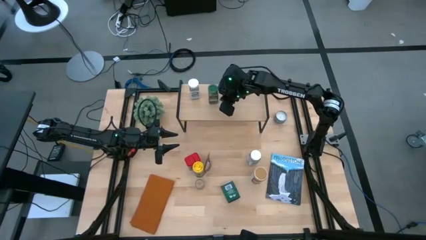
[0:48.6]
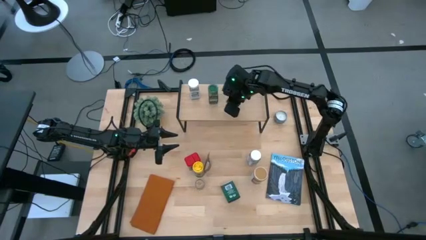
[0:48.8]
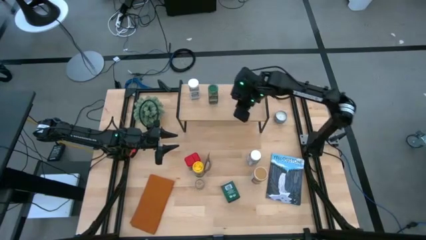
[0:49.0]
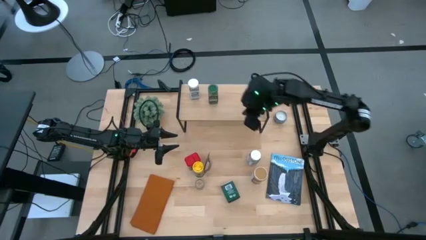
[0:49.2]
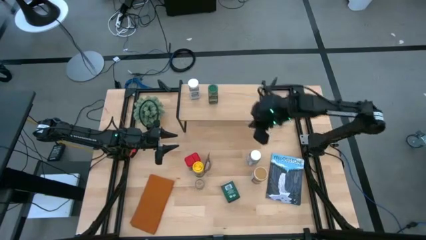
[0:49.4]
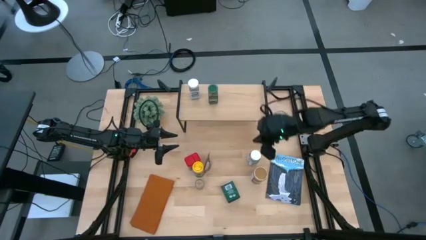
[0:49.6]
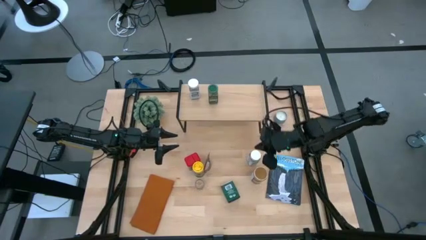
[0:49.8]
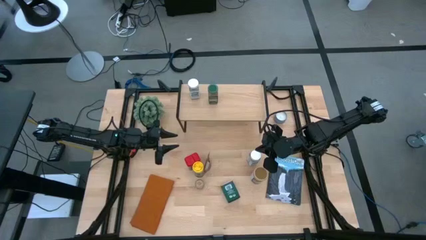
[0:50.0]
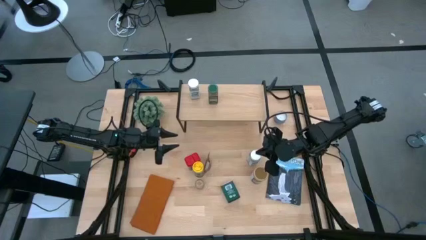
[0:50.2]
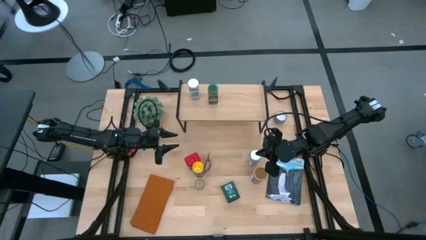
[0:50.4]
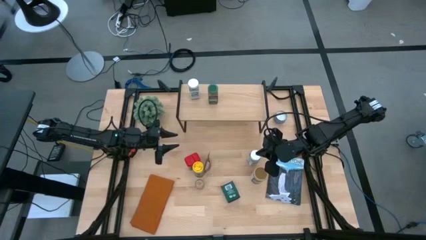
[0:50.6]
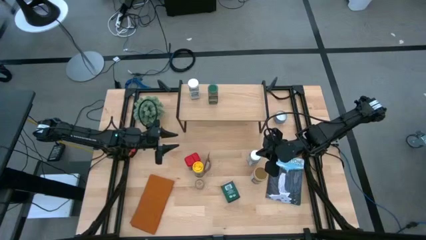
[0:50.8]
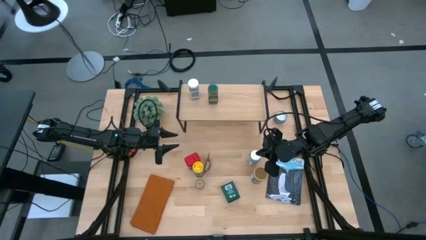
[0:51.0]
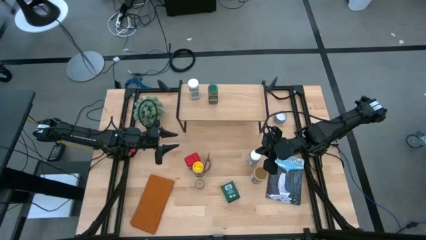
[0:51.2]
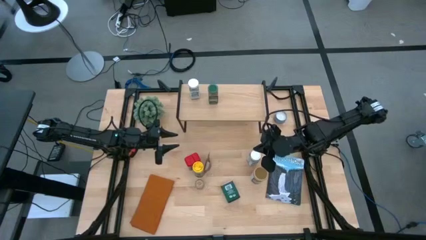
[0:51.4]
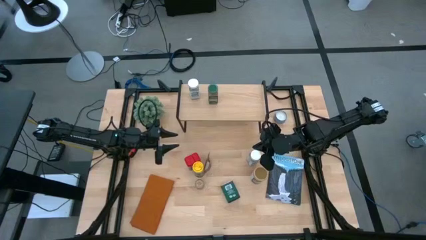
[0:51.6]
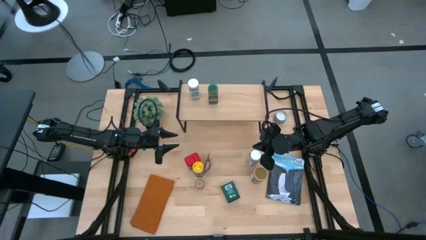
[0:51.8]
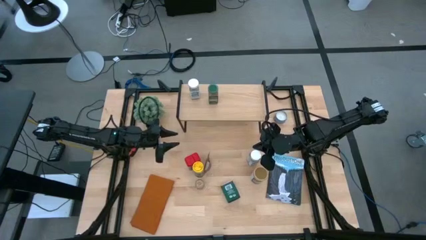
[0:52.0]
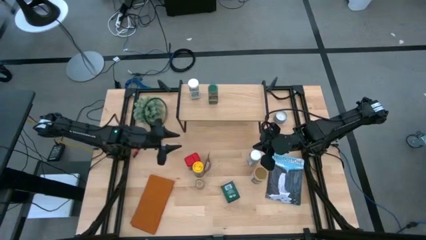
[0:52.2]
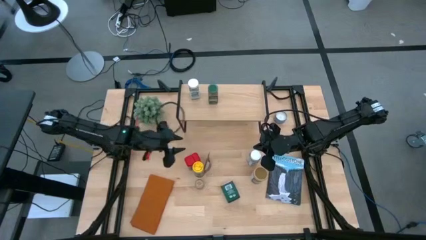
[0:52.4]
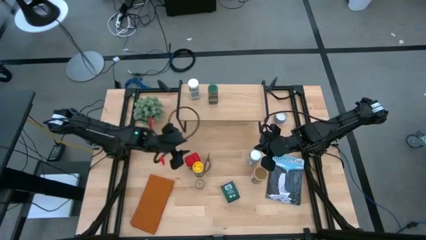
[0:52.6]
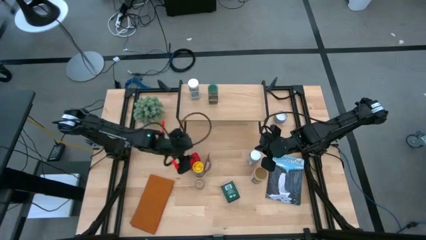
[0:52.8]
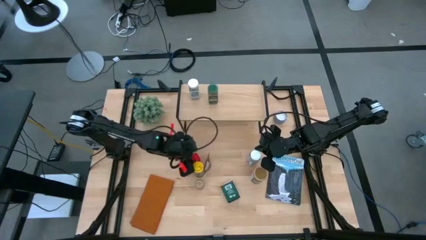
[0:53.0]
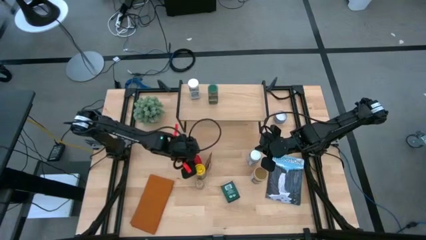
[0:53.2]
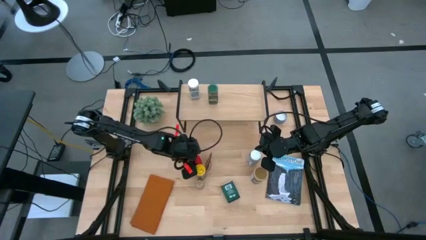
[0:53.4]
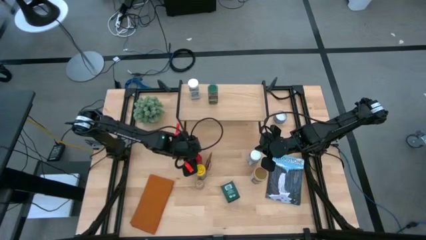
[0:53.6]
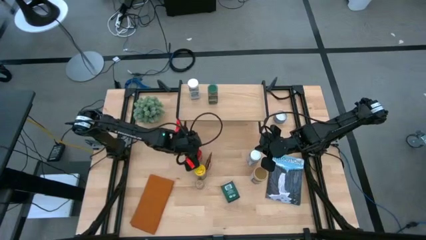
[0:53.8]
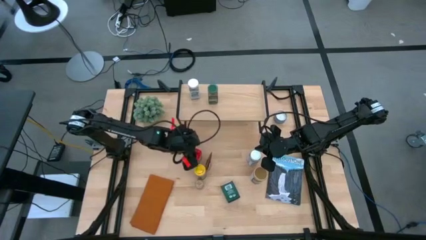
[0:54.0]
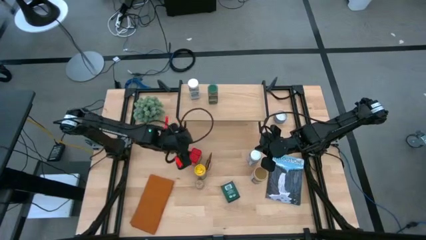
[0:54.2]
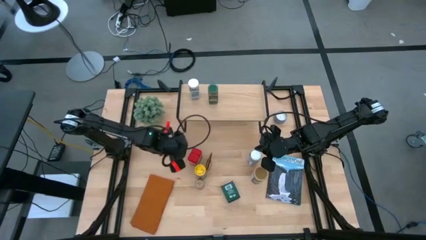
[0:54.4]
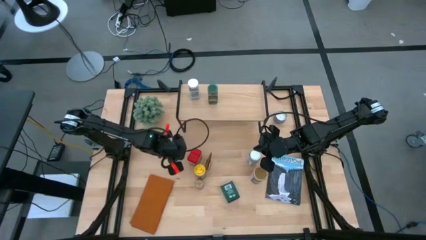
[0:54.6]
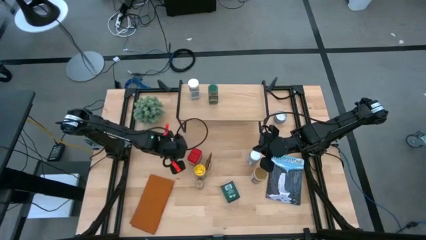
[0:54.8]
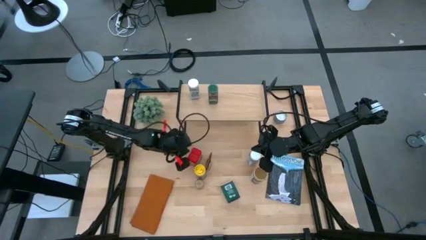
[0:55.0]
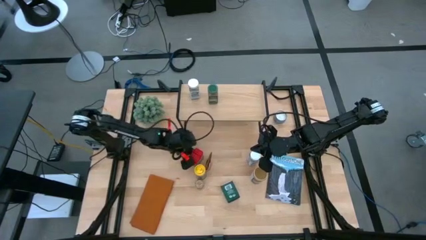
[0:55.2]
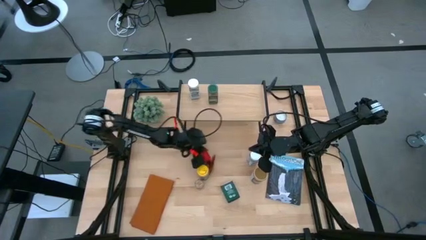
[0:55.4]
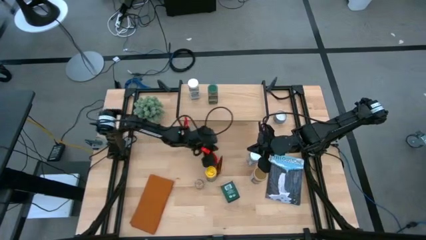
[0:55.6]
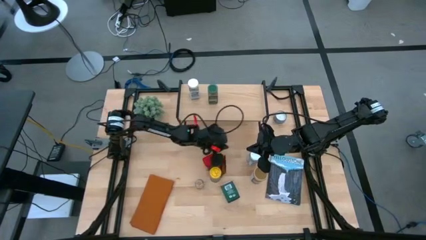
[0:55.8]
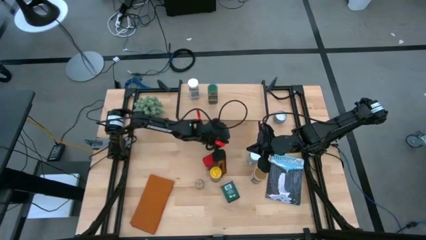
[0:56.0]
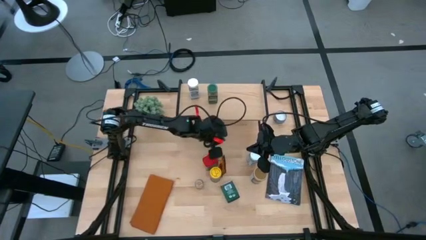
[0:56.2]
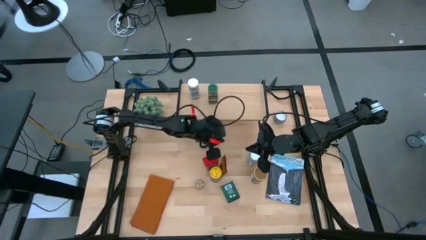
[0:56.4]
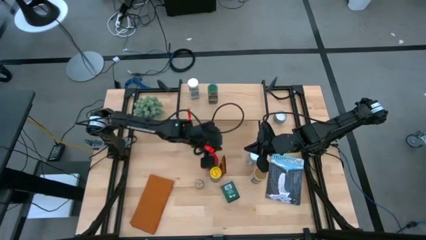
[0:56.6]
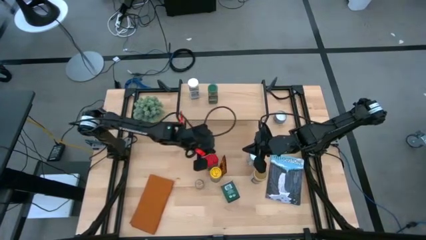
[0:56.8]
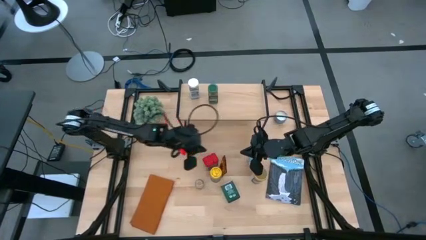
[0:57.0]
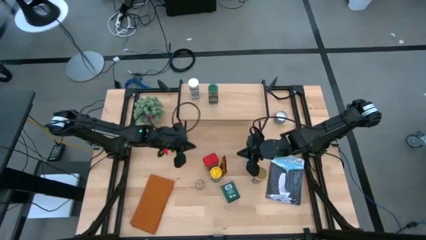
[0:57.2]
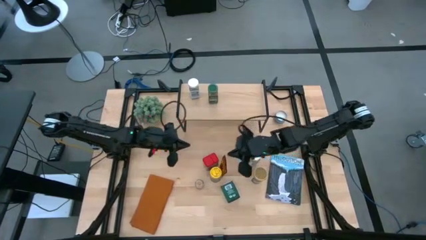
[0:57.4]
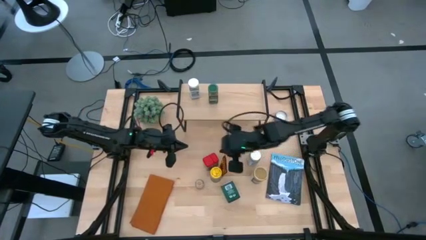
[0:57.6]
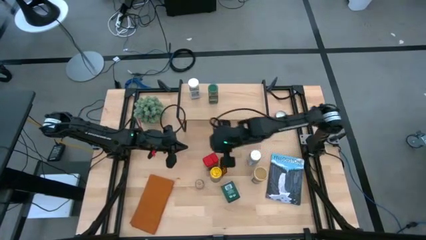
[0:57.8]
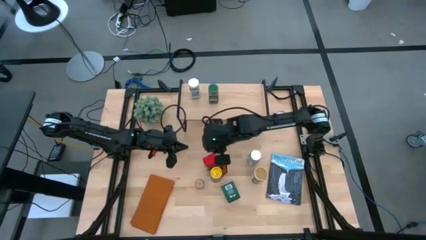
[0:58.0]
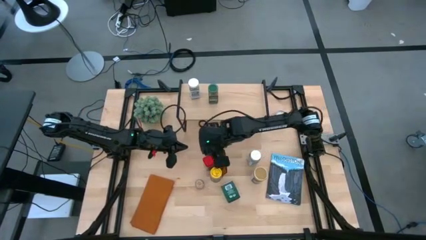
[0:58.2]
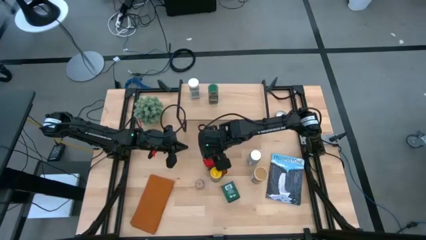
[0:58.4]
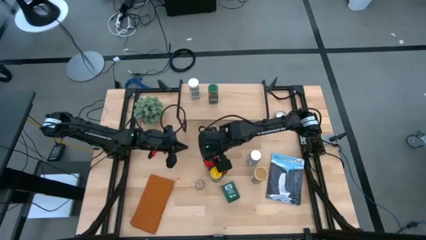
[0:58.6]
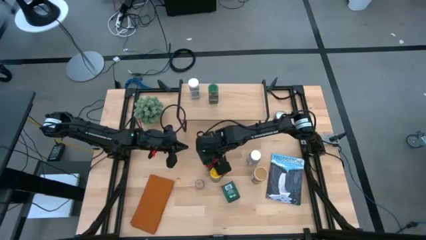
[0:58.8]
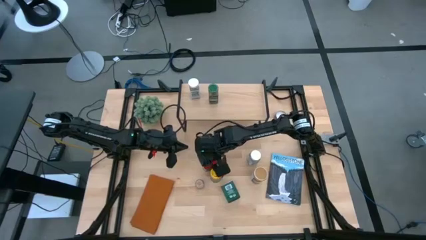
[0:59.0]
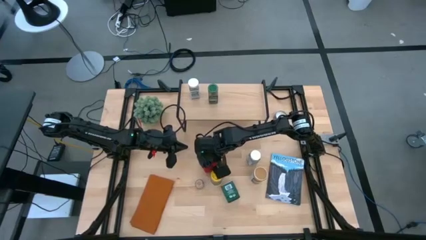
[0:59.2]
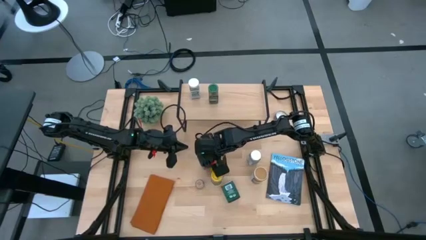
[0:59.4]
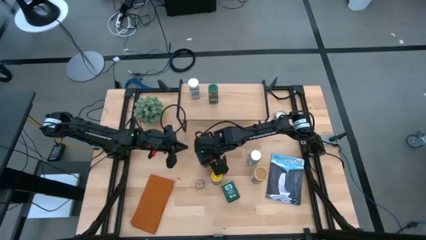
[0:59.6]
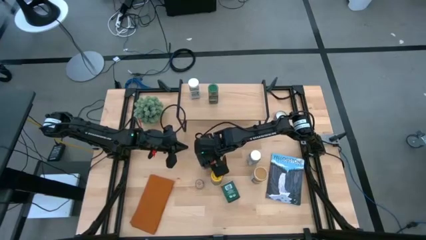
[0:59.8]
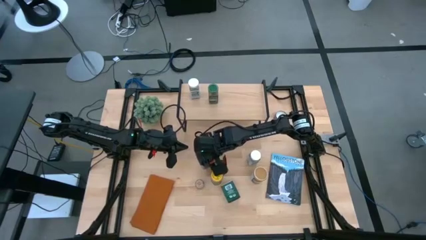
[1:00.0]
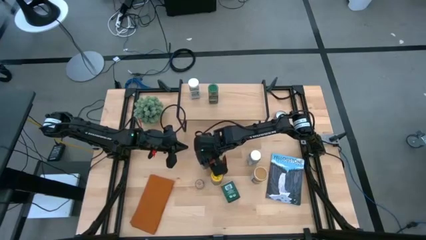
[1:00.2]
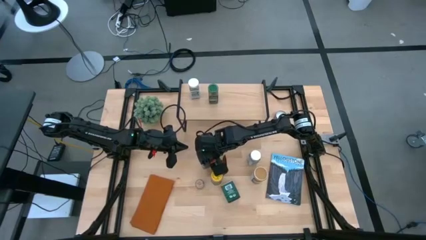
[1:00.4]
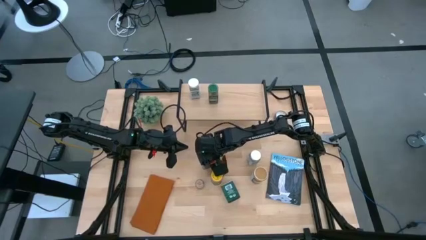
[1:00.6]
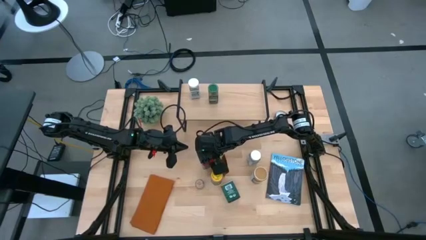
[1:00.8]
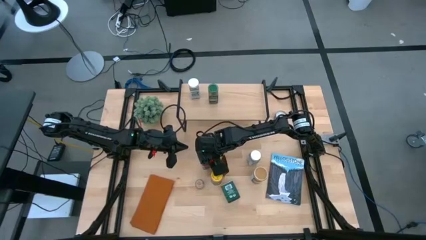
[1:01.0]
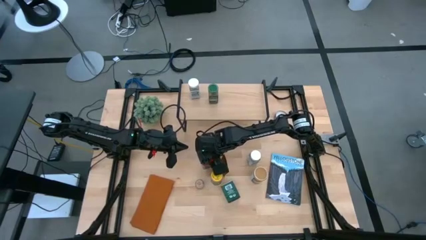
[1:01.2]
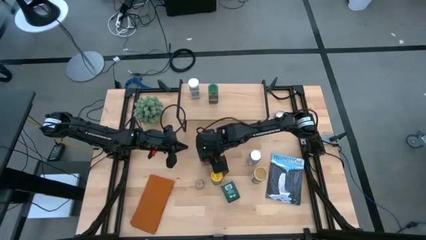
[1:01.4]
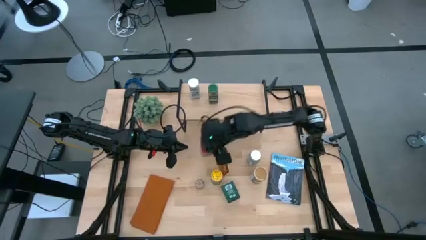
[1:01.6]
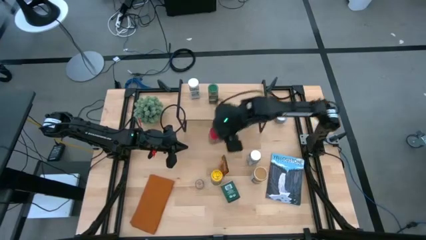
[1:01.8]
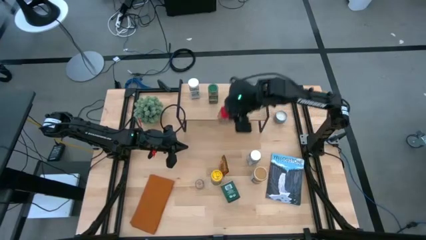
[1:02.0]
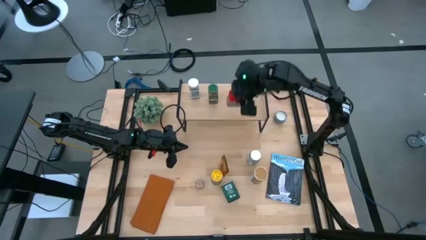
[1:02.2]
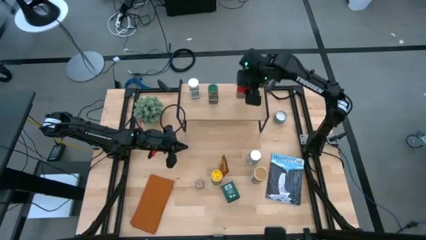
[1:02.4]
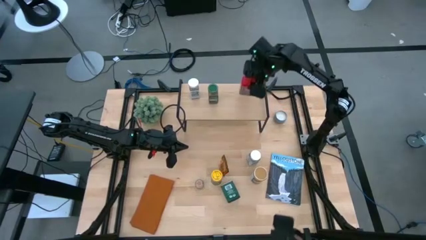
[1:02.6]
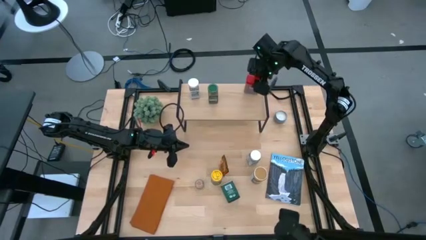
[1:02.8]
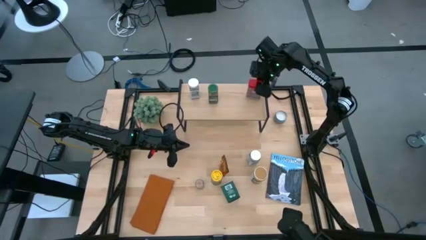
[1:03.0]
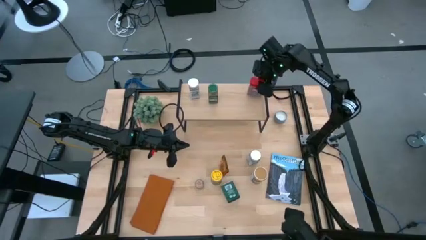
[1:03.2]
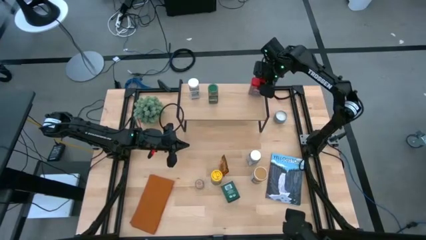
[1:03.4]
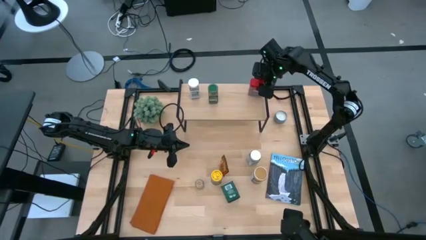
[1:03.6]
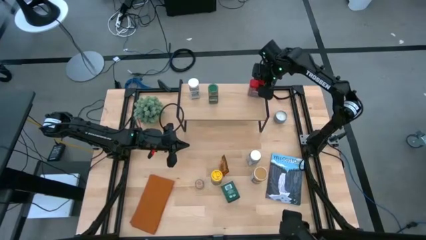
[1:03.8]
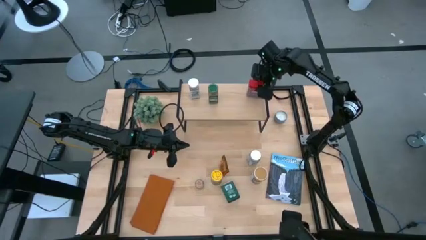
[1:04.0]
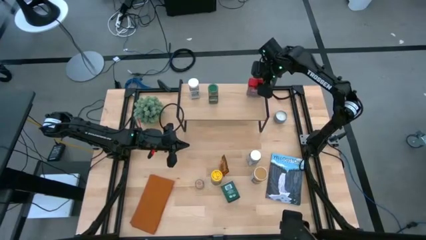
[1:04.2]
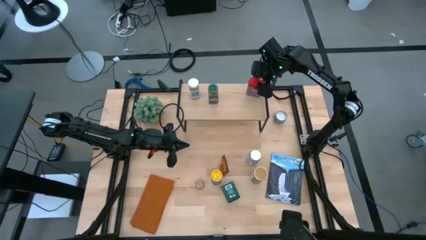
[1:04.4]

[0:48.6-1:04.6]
Task: Shelf spices
Put the red seasoning can on the shelf
